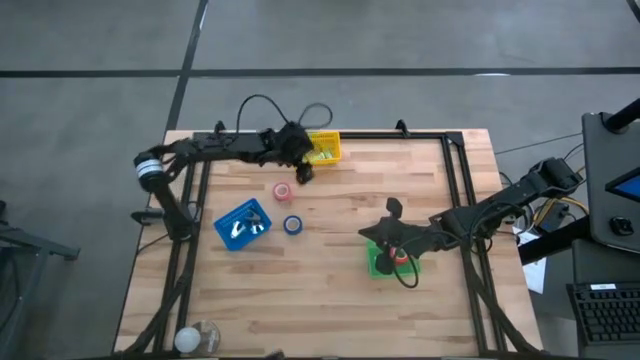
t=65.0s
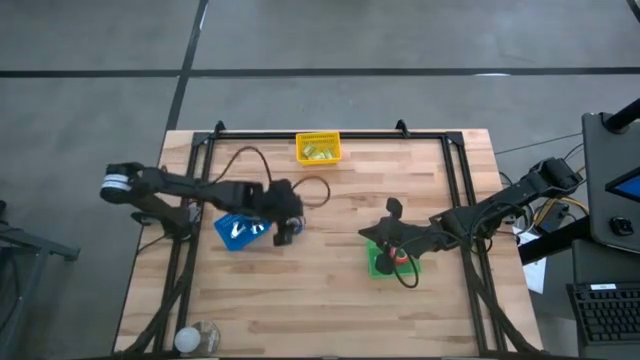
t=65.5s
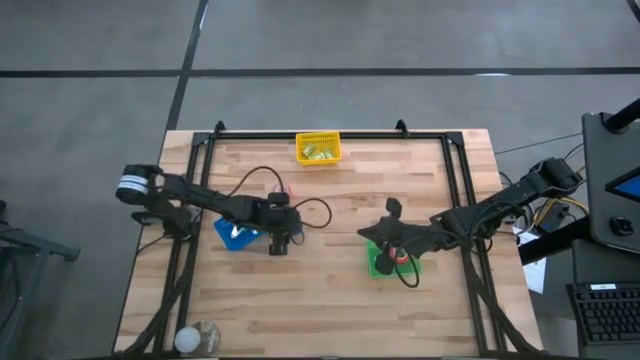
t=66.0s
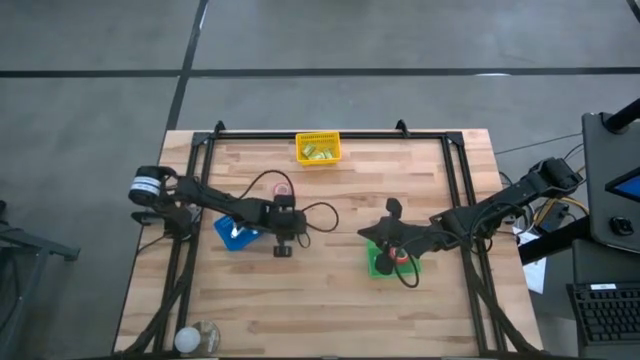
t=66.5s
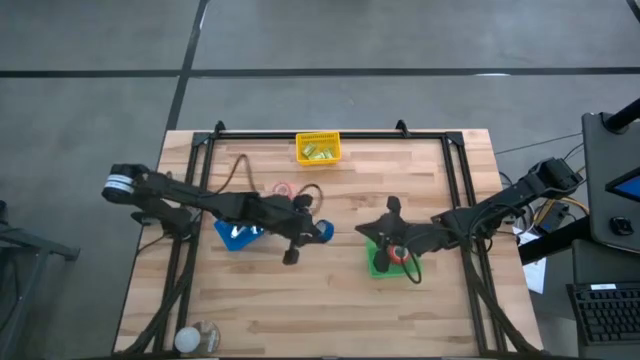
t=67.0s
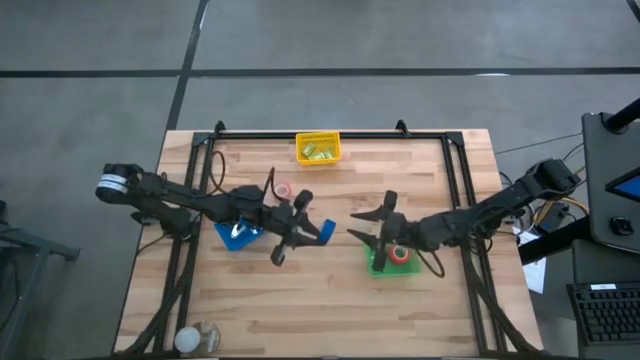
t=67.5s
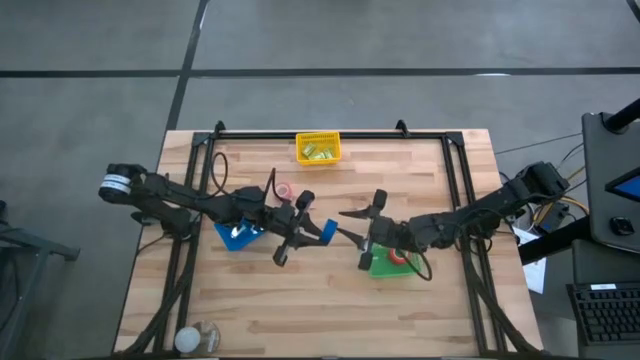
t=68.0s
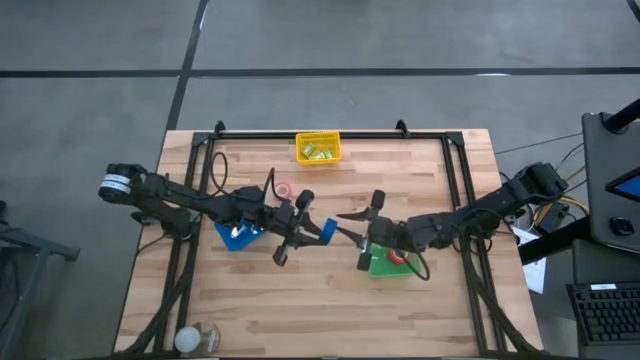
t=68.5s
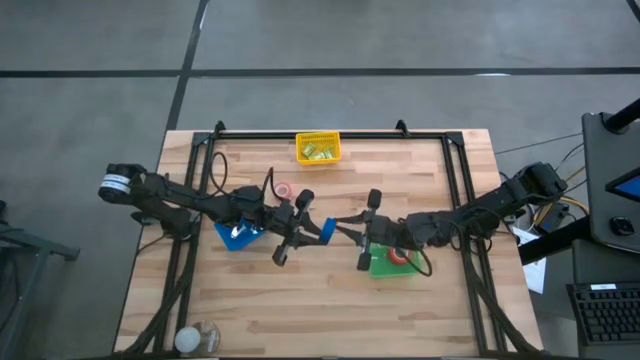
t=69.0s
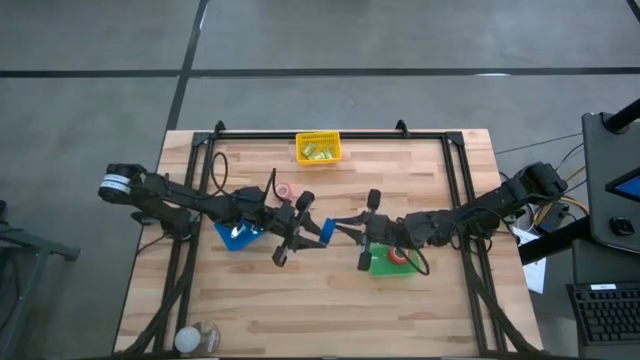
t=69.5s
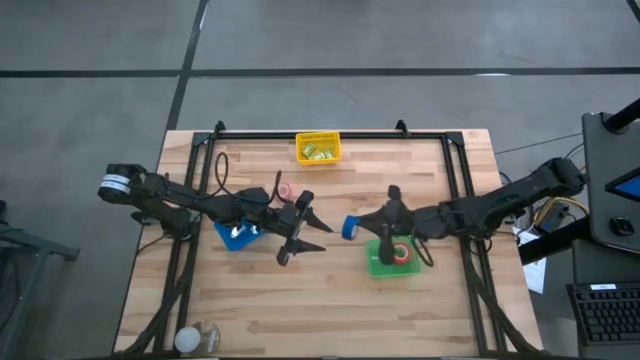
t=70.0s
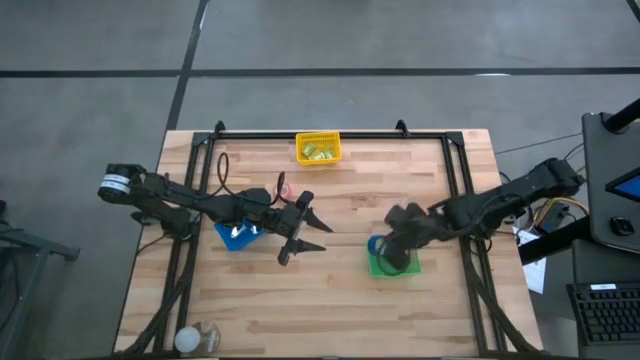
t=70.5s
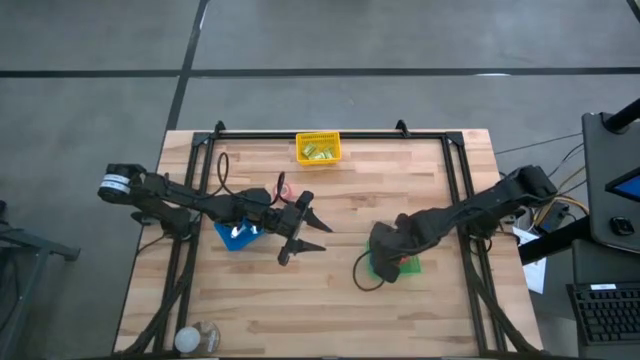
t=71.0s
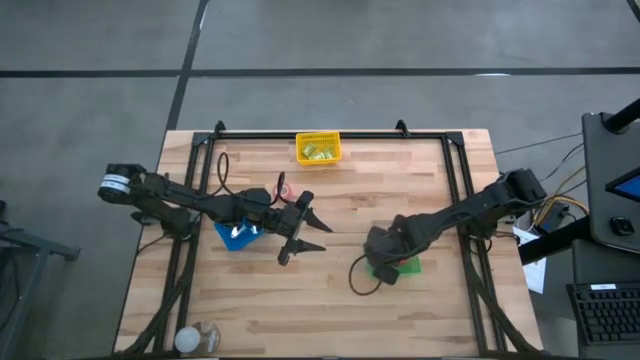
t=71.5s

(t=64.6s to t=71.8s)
Task: Pick and place Stapler, Stapler remover, tape
Put the blue tape into the green bin

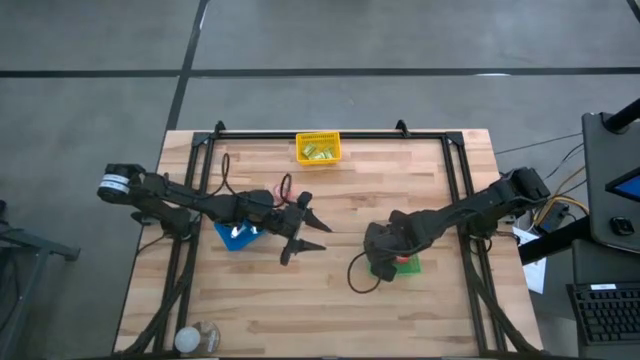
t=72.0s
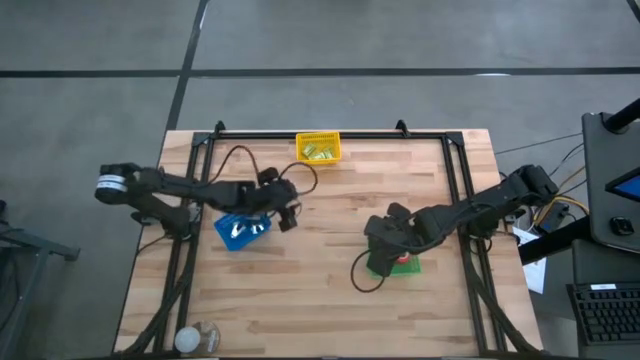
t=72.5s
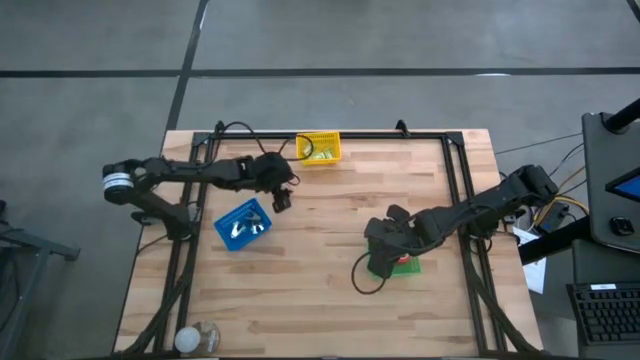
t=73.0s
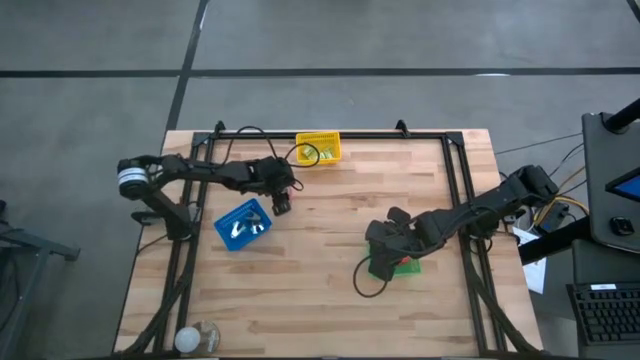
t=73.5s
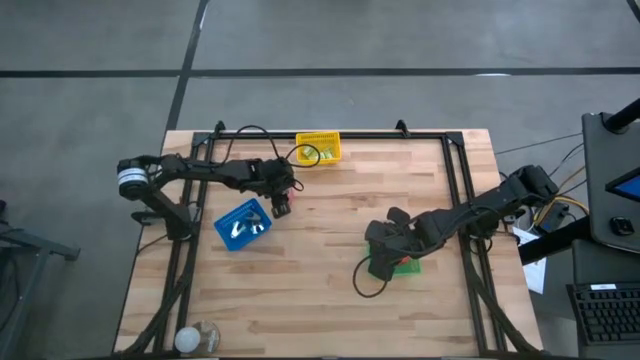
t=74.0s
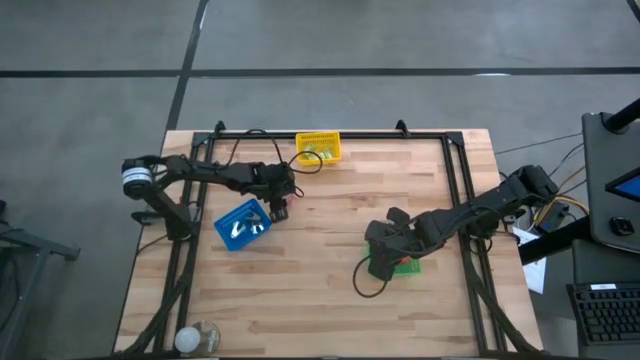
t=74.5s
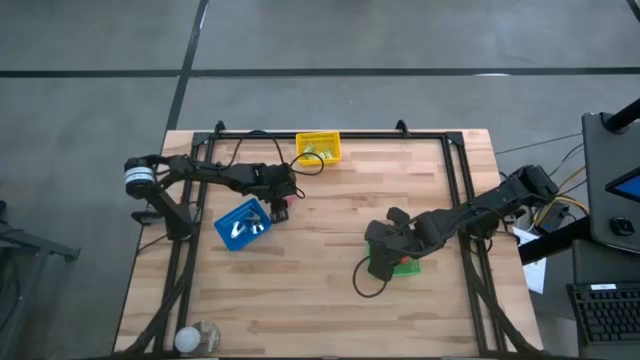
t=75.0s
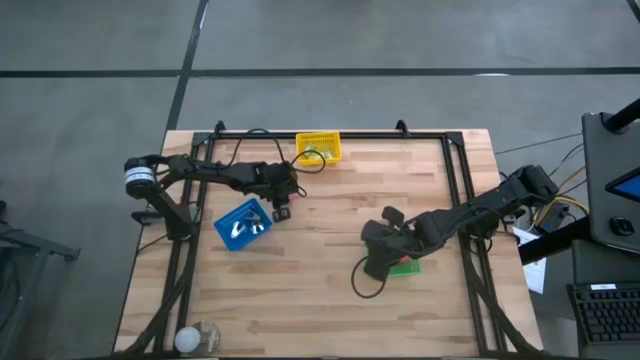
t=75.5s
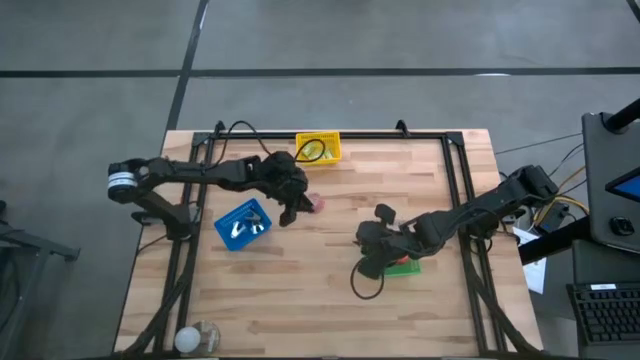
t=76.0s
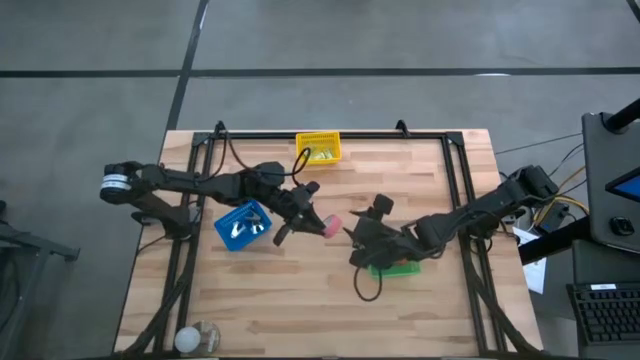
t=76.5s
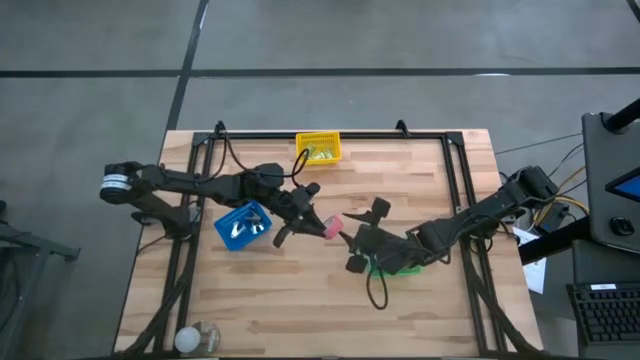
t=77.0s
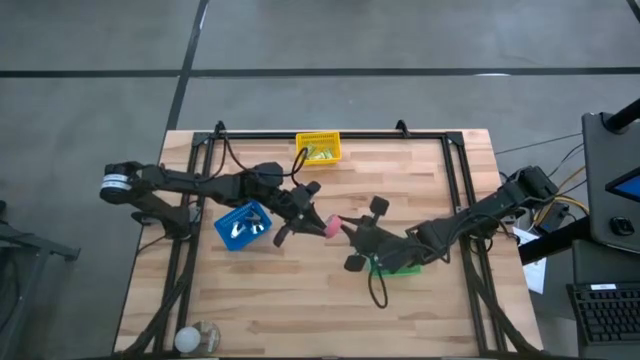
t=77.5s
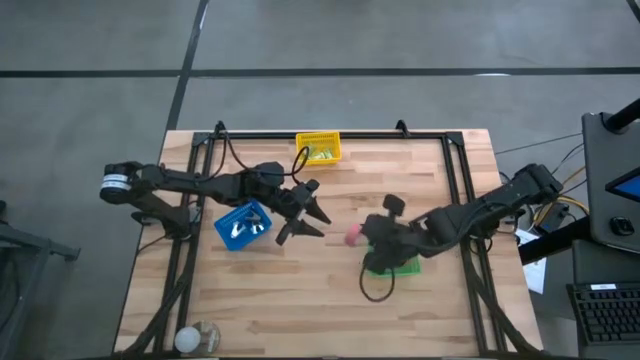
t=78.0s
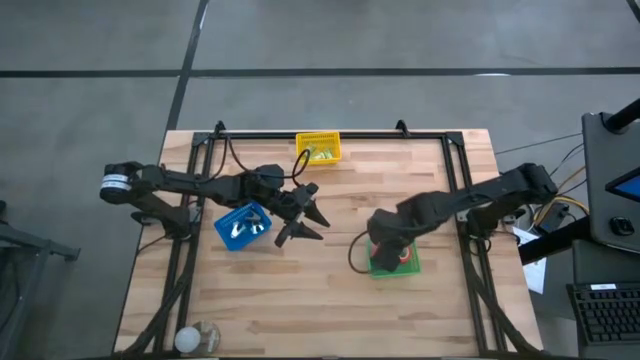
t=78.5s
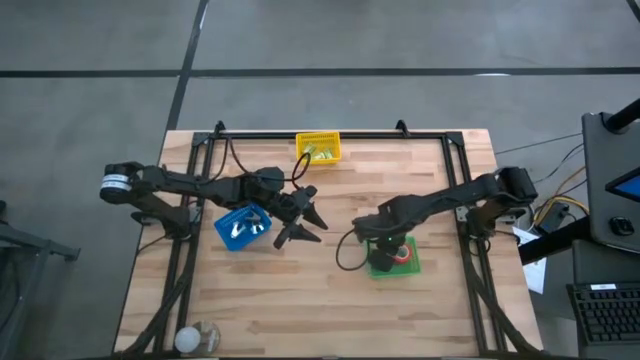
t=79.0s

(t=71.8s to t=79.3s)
Put the pink tape into the green bin

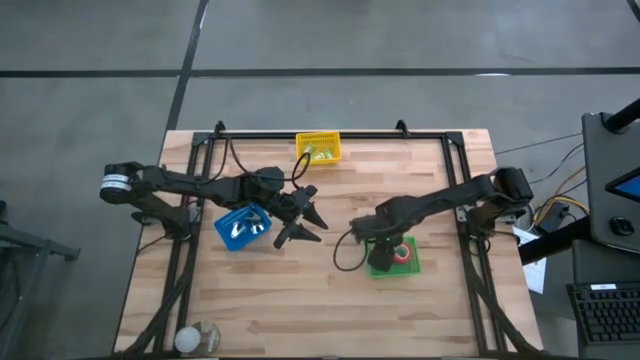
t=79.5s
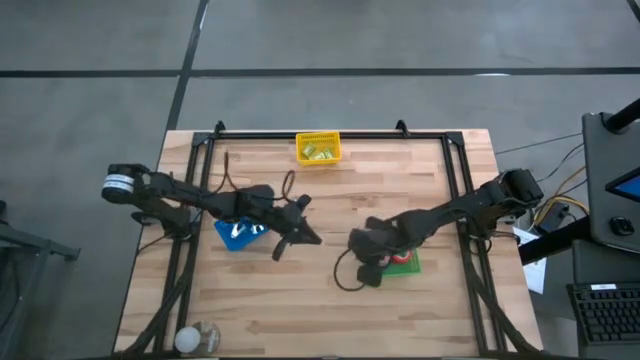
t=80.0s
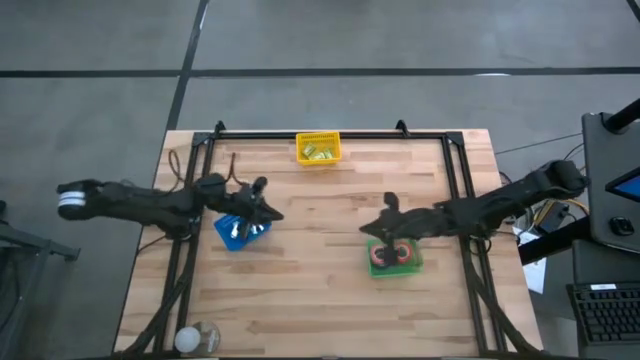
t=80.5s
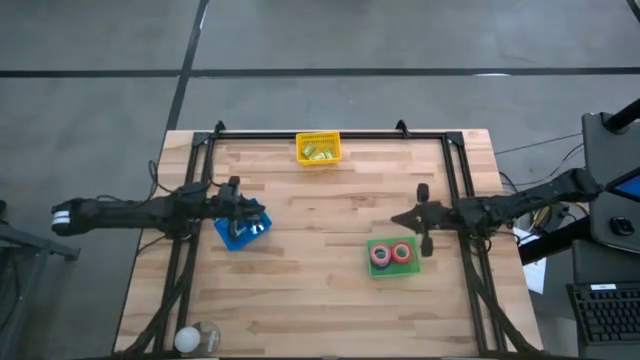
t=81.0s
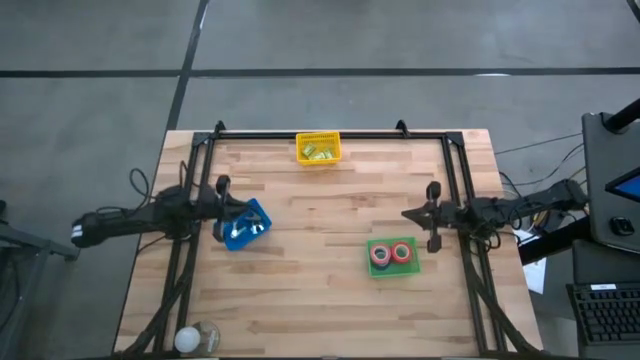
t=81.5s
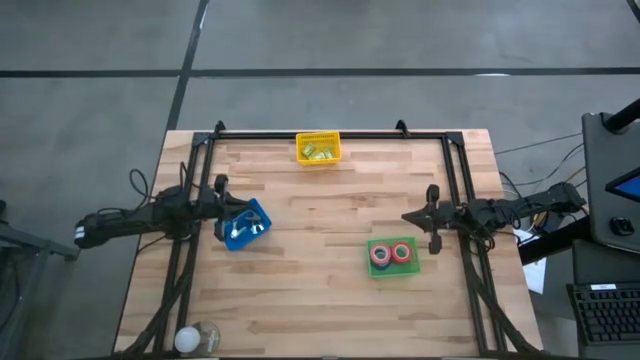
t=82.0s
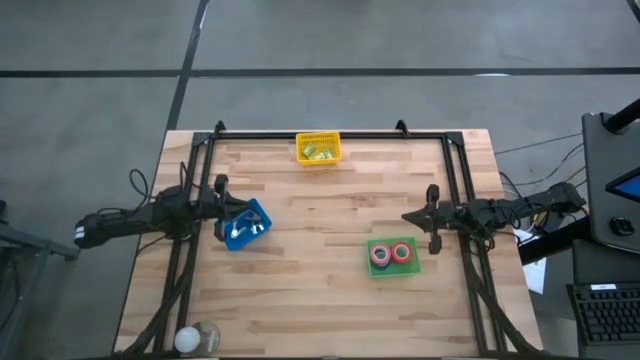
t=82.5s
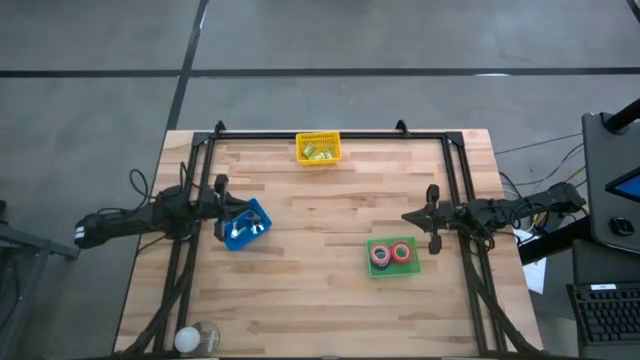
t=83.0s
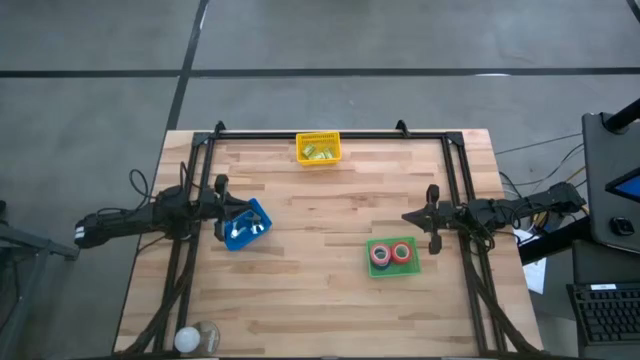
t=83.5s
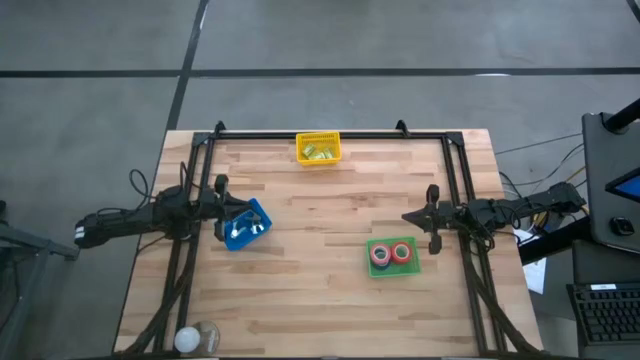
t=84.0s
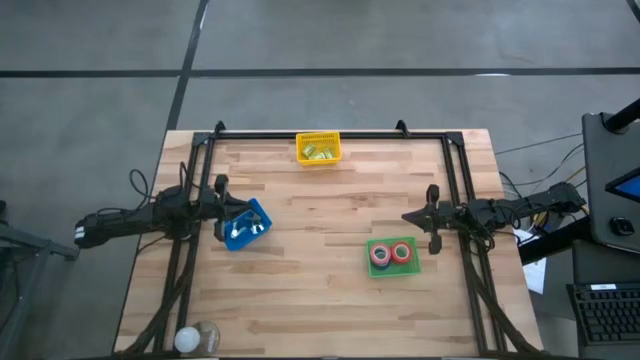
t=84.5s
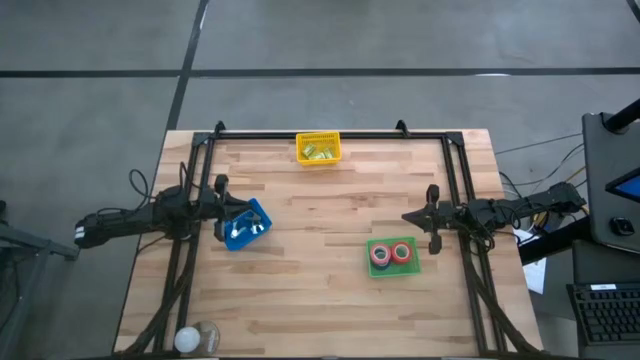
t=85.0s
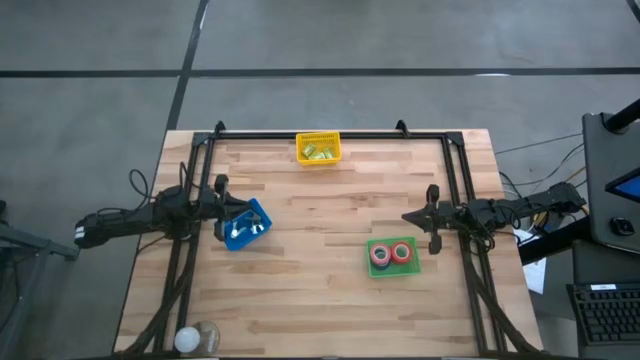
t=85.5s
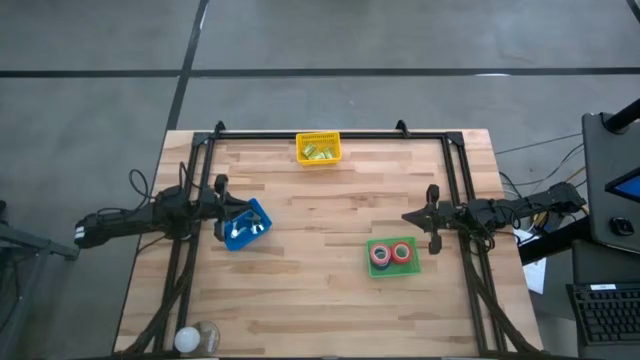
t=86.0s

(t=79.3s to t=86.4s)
Return to Home position
